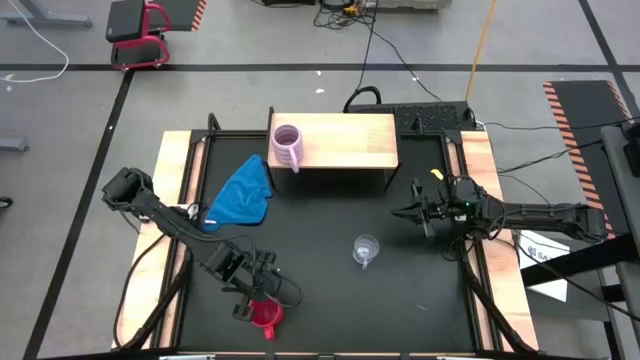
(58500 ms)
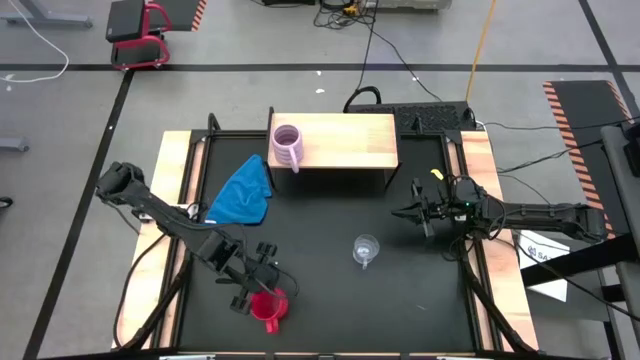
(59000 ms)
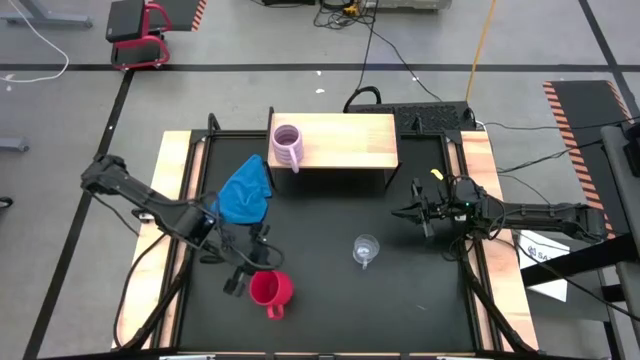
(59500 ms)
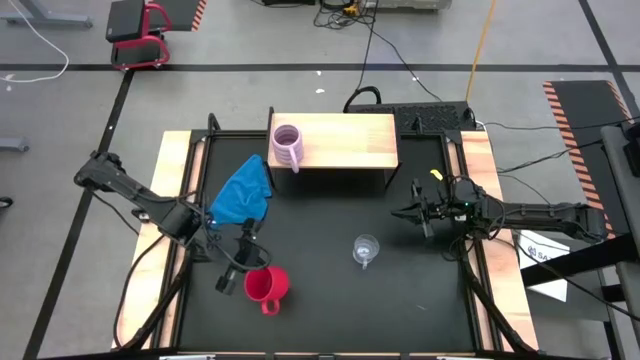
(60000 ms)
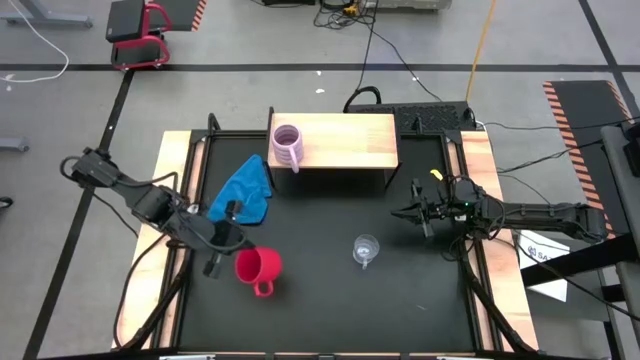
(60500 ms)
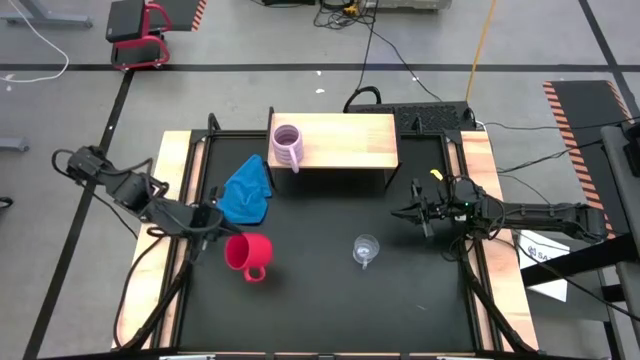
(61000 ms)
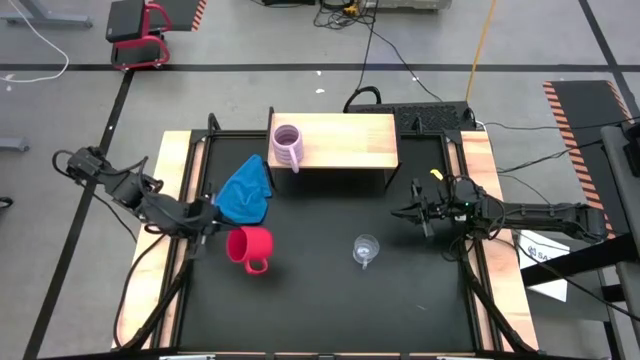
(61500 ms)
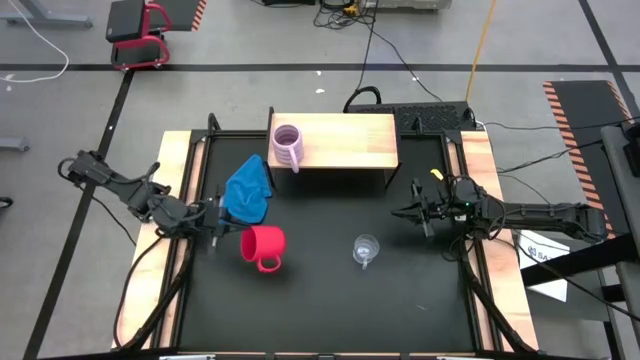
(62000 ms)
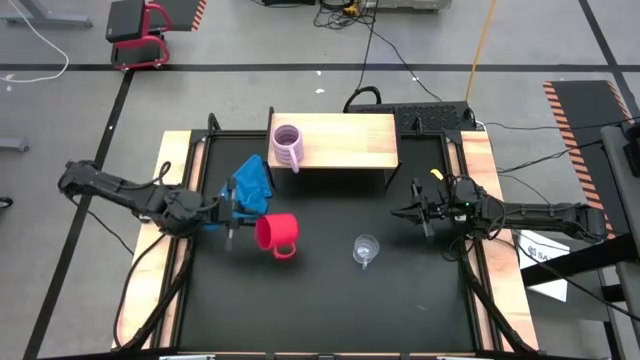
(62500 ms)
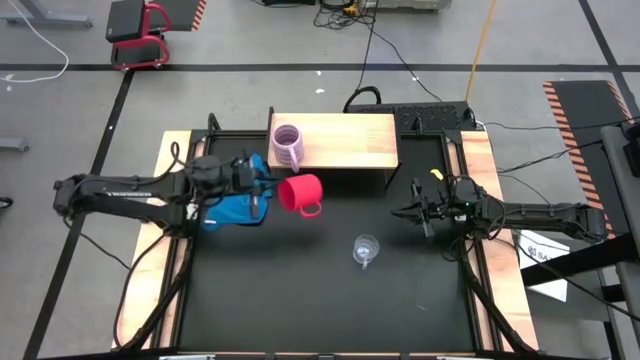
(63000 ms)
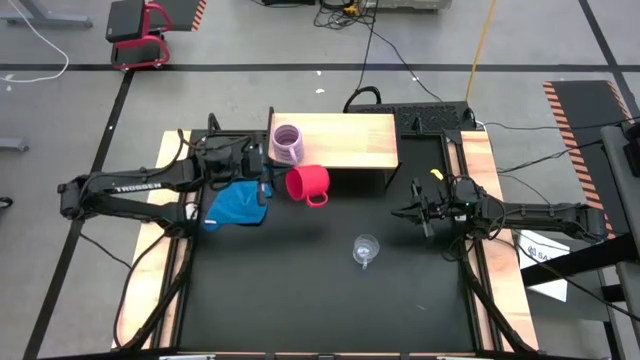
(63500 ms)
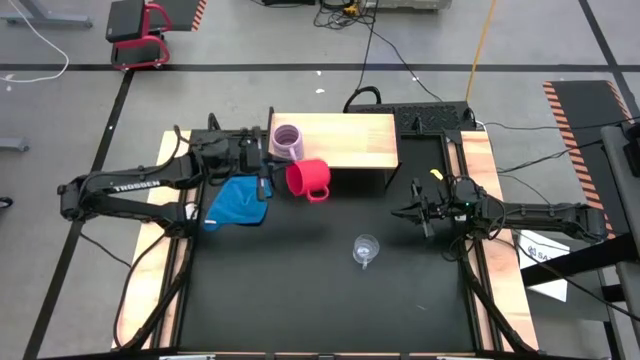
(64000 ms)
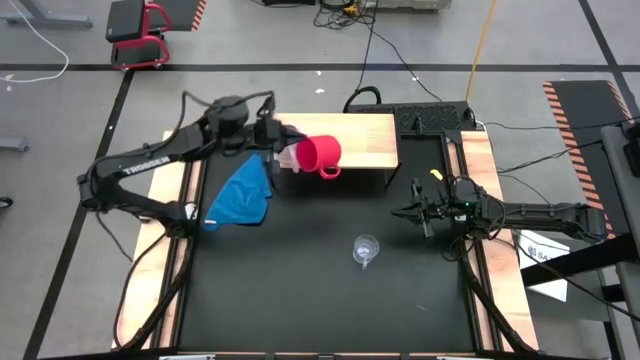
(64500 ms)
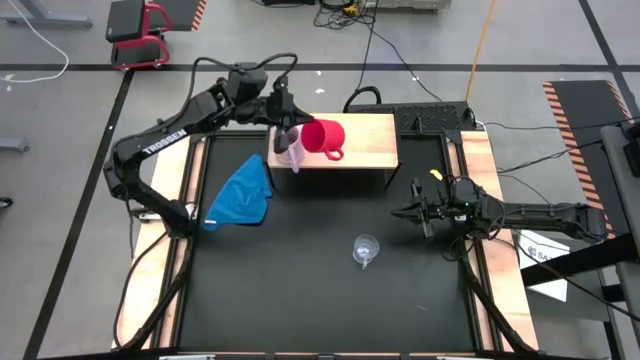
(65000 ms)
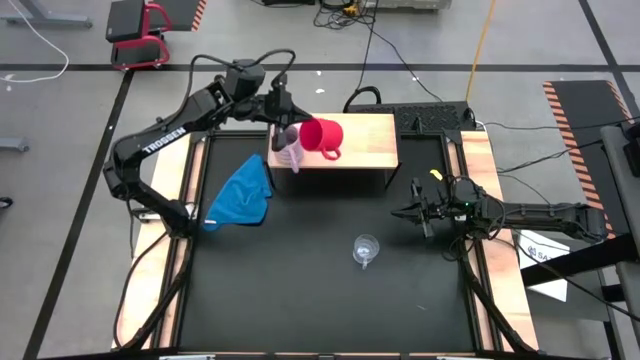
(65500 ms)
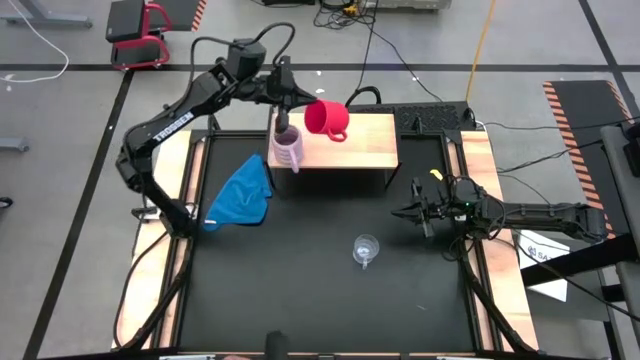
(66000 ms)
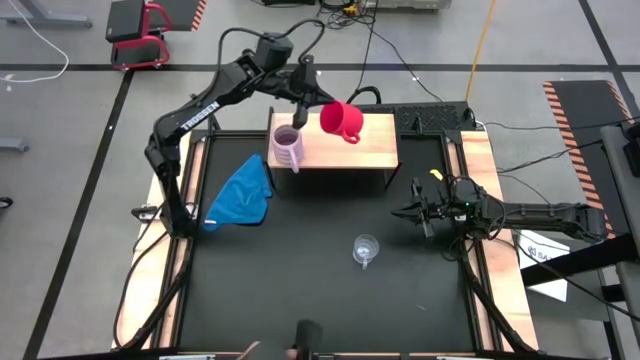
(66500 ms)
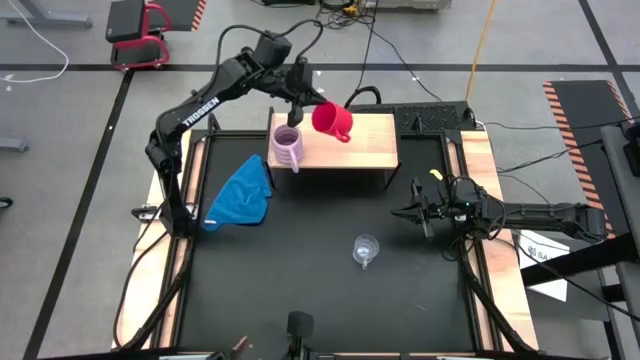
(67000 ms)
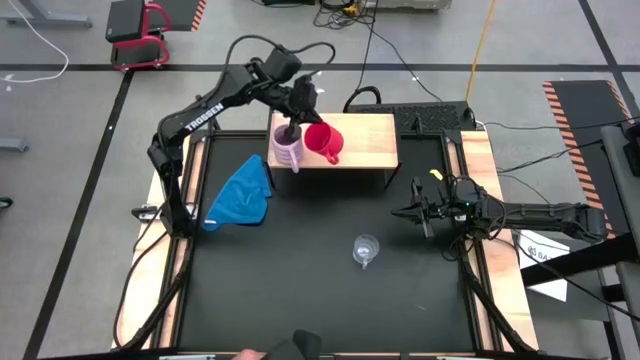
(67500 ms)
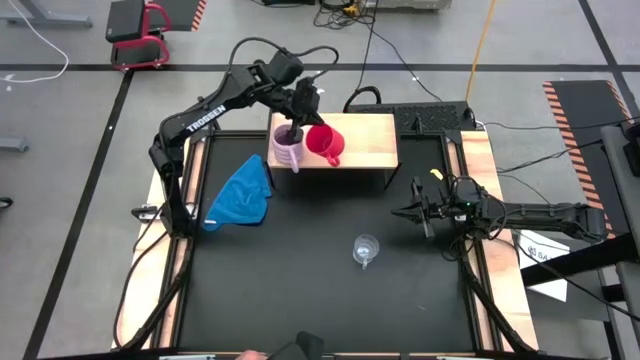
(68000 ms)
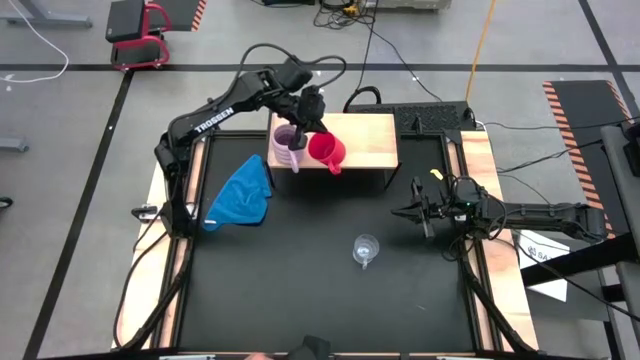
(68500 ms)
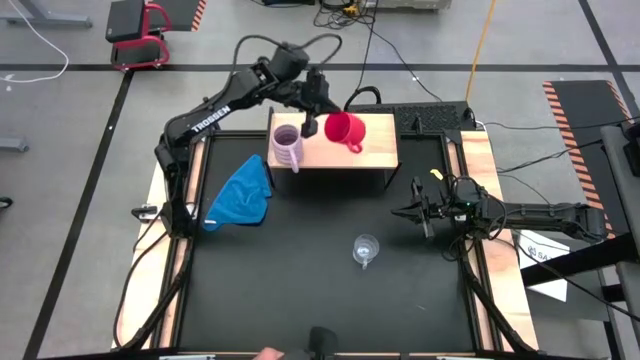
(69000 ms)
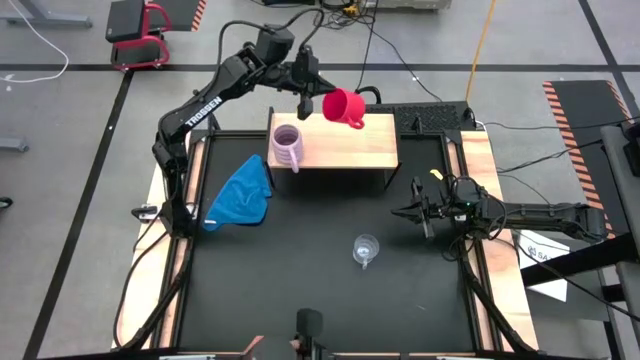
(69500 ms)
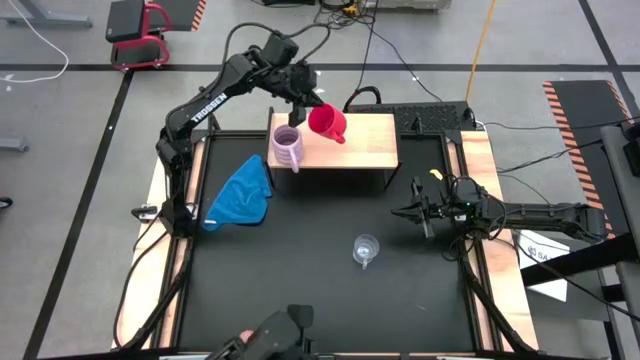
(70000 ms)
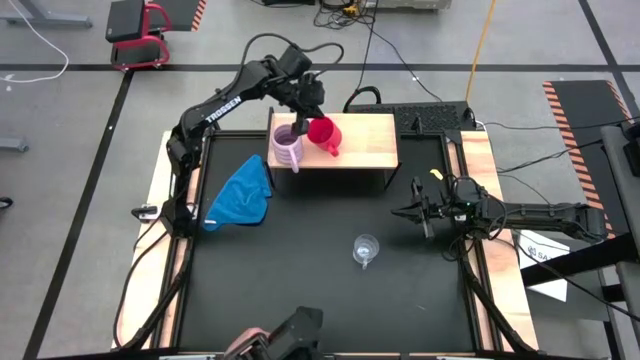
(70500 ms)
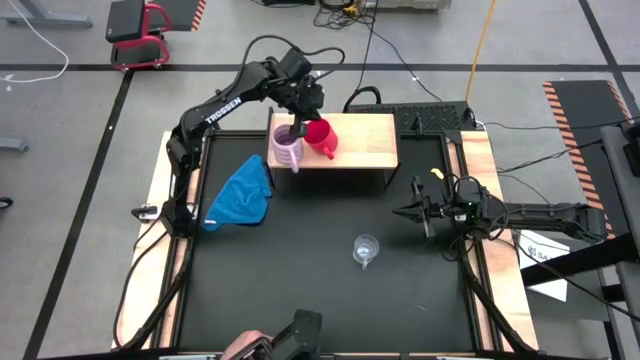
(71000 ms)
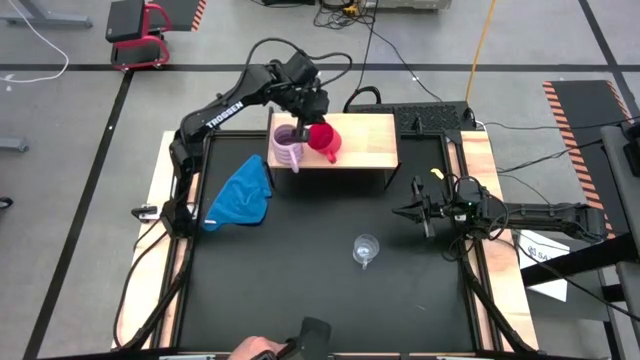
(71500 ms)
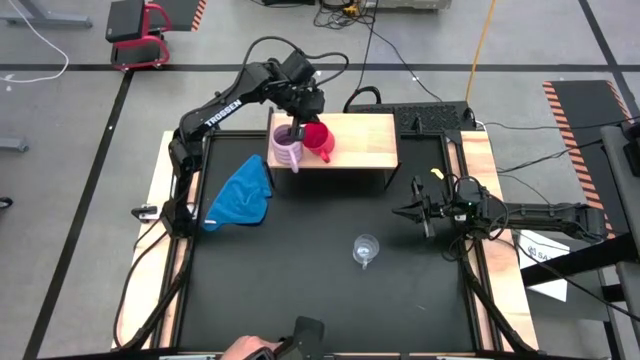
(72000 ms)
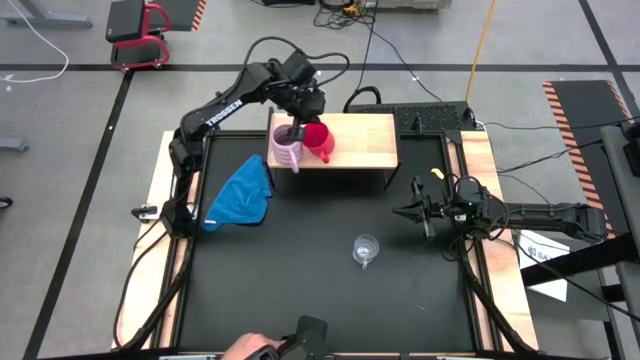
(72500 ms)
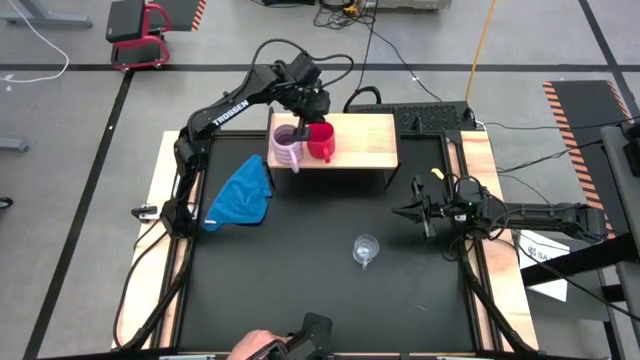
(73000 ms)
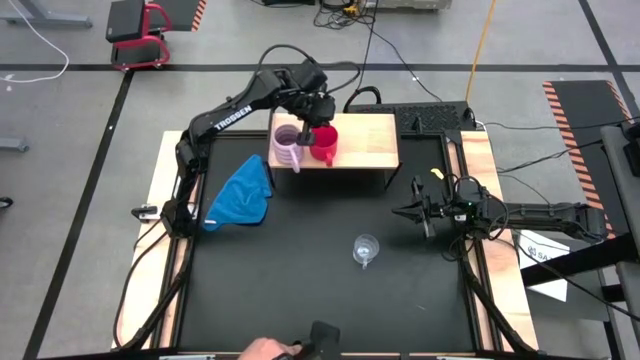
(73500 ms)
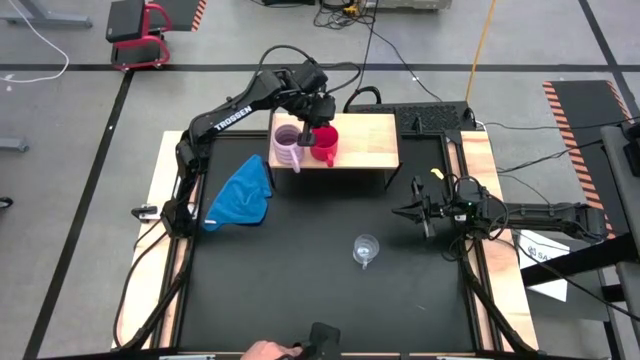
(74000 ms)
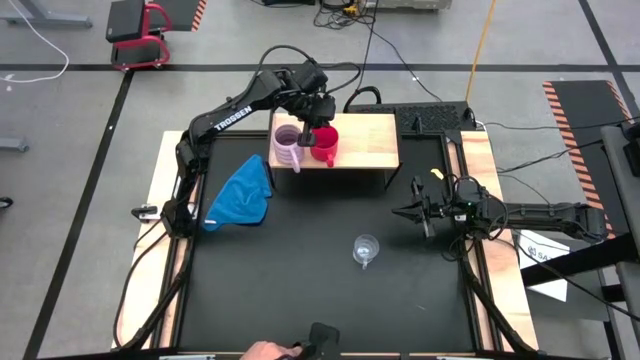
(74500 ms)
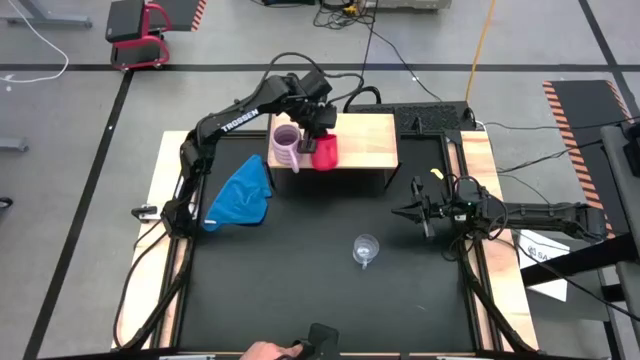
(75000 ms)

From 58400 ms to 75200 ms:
Task: Stack small to large cups/mugs on shelf
Put the red mug on the shelf

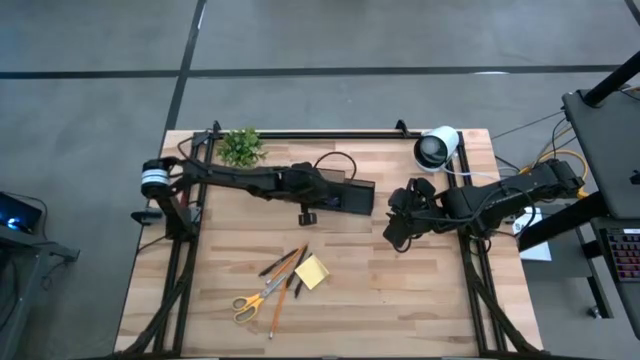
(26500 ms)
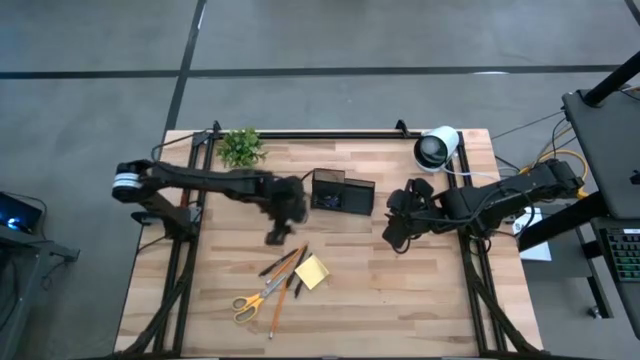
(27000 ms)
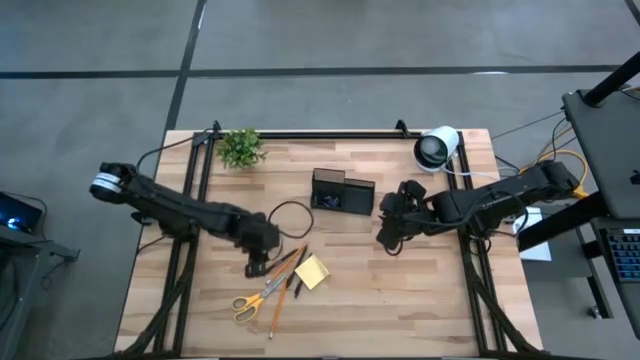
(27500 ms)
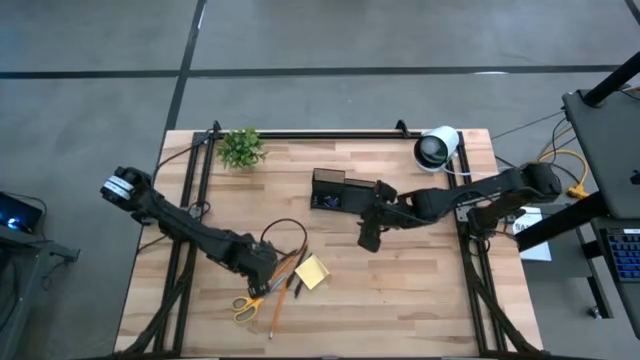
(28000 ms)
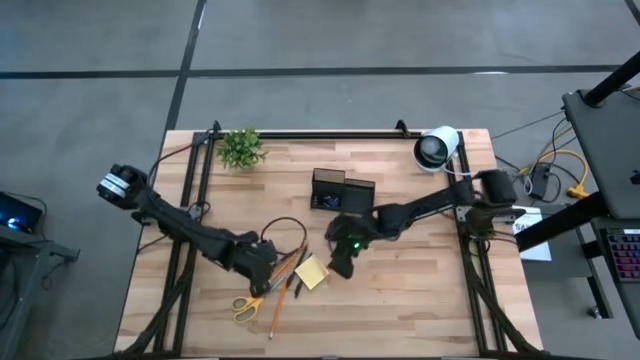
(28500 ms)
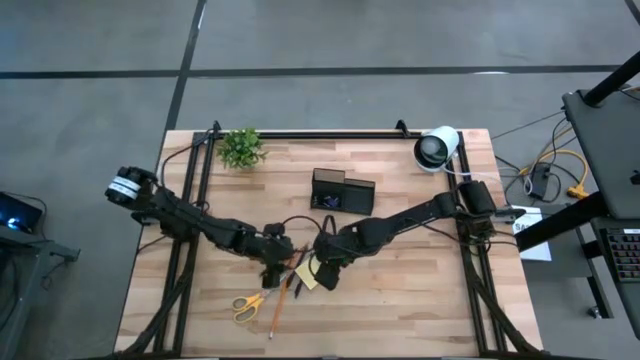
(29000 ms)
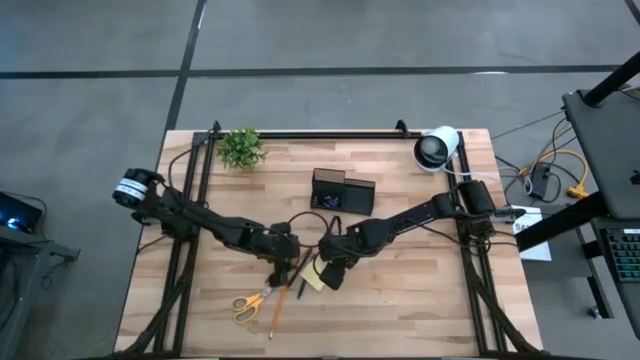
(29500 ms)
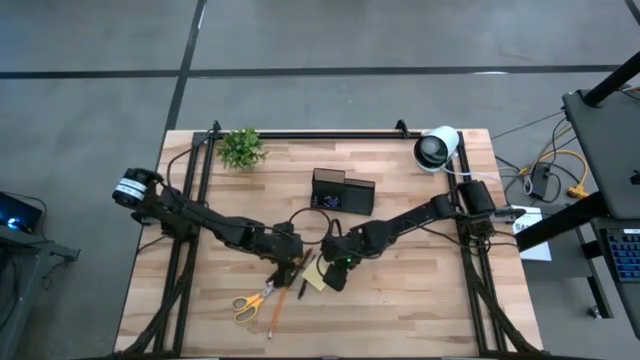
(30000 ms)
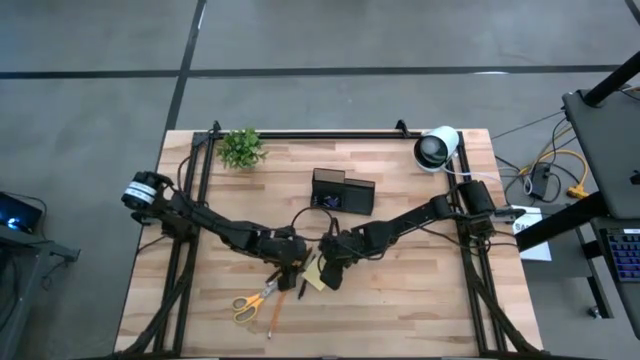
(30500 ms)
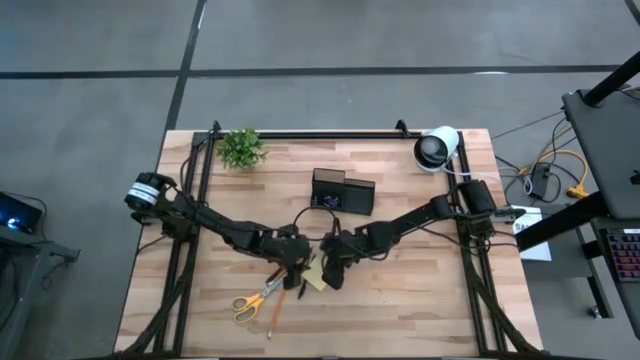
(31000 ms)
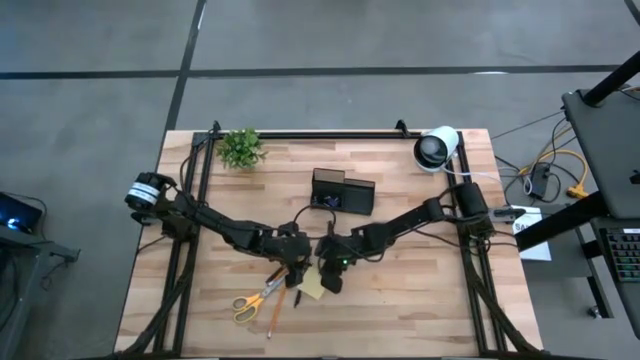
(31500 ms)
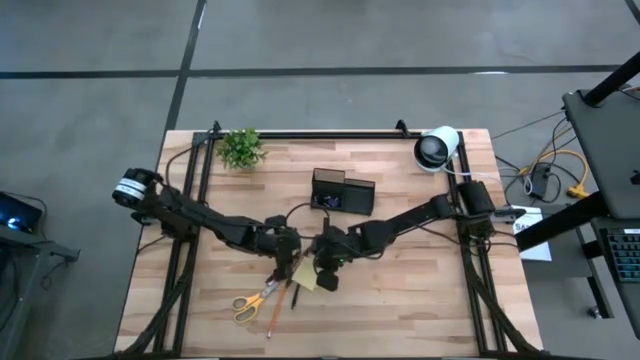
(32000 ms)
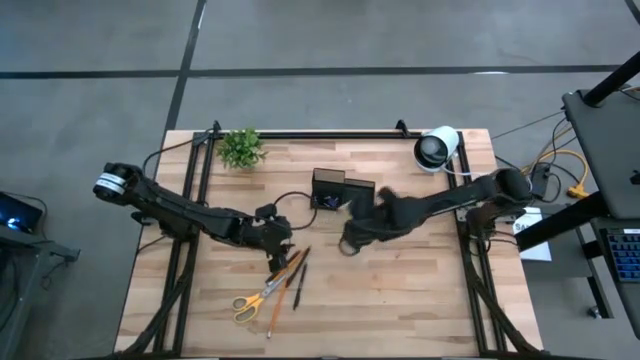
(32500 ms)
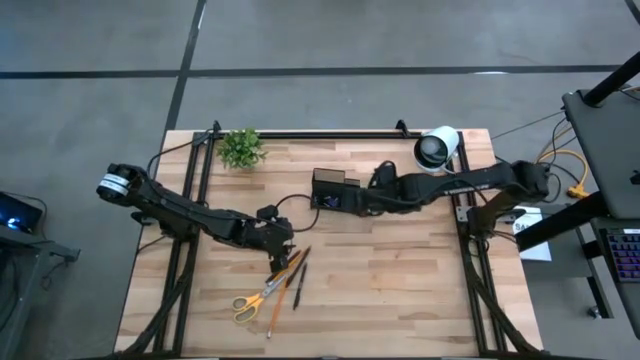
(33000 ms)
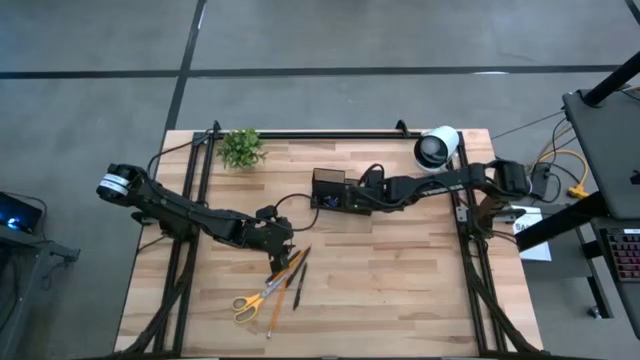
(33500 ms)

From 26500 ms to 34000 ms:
Task: Pick and place office supplies into organizer
Put the yellow sticky notes into the black desk organizer
